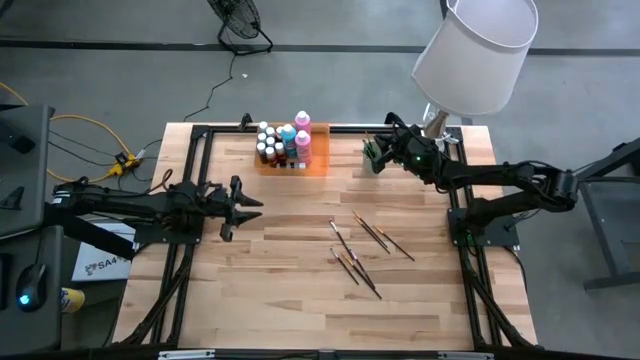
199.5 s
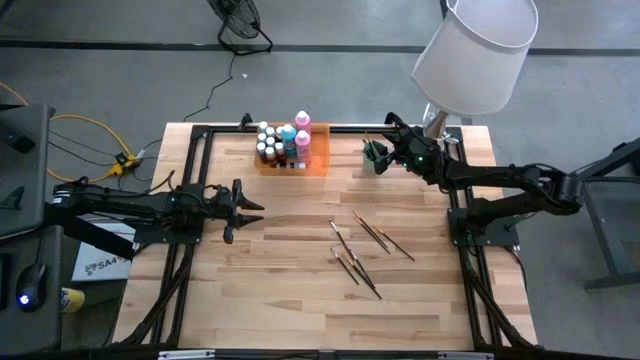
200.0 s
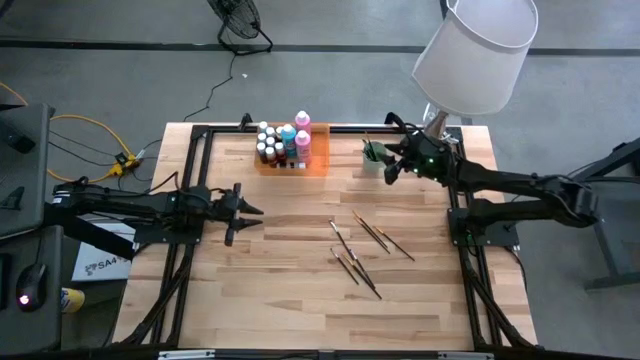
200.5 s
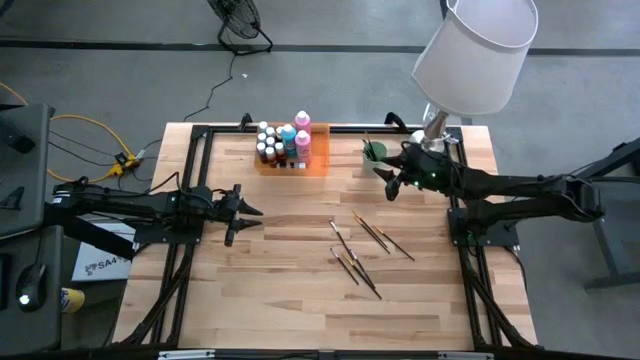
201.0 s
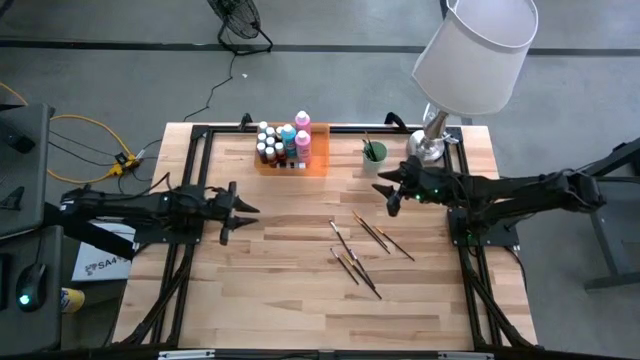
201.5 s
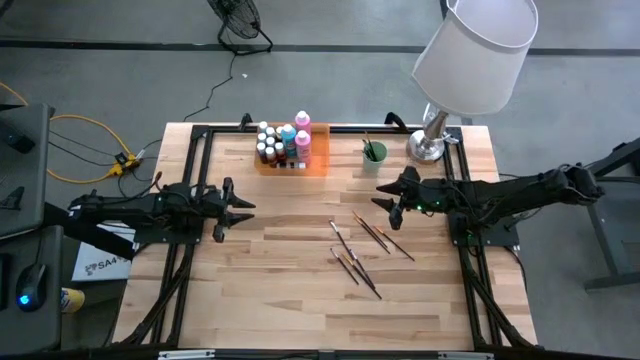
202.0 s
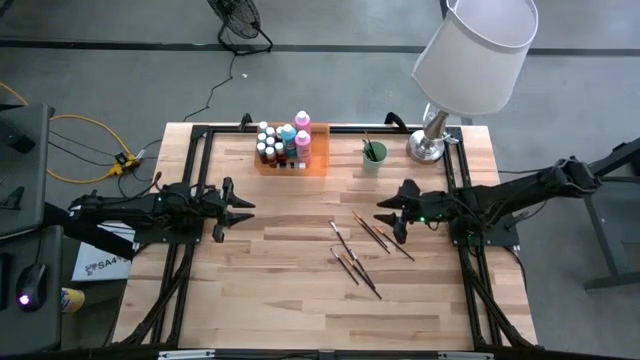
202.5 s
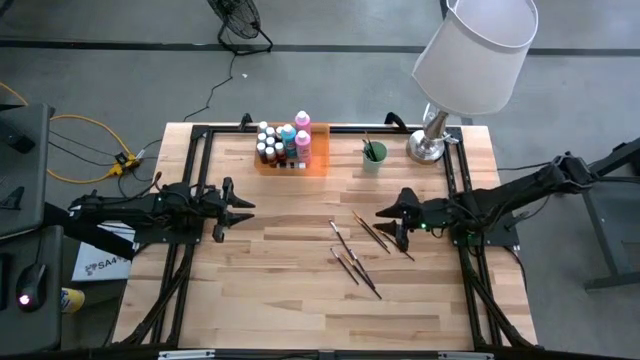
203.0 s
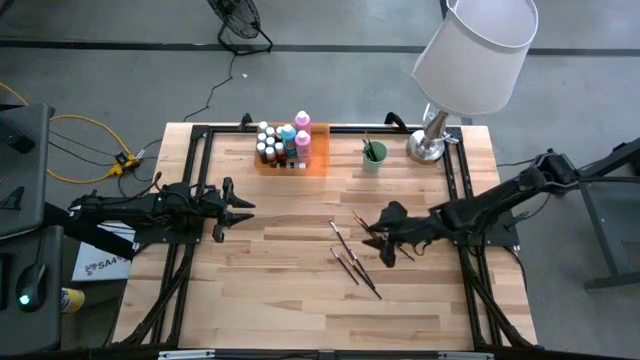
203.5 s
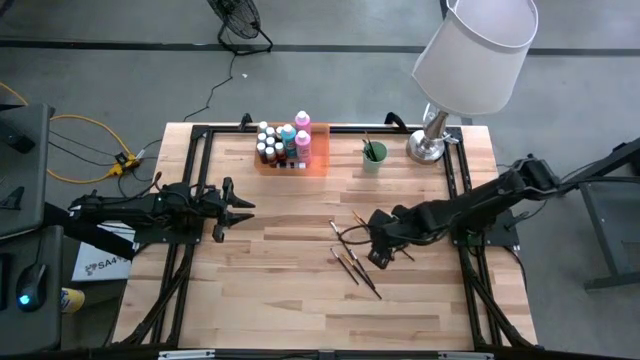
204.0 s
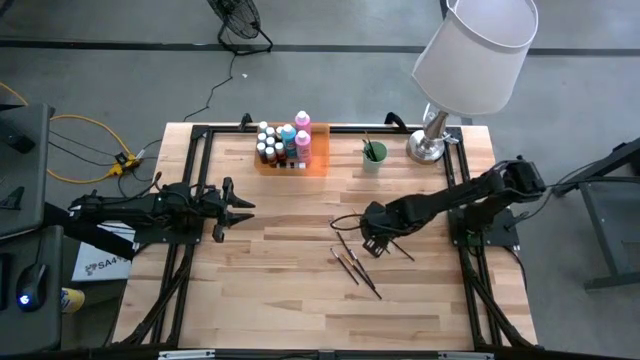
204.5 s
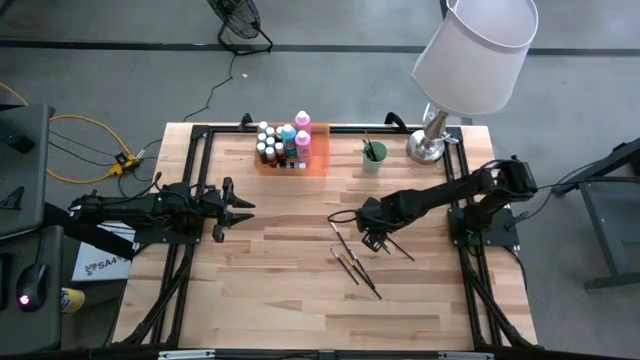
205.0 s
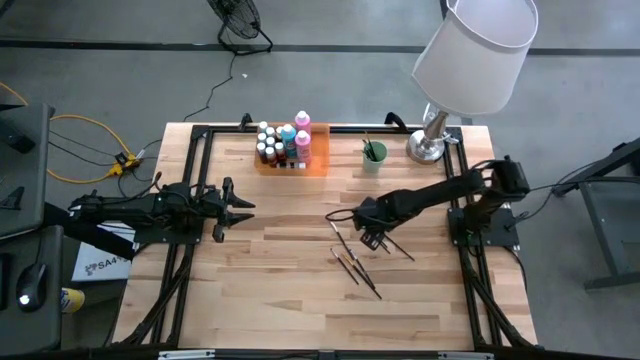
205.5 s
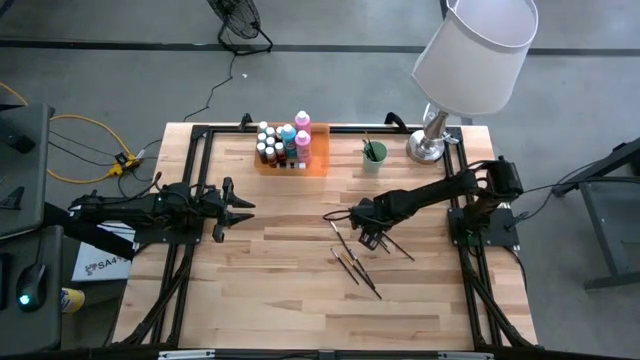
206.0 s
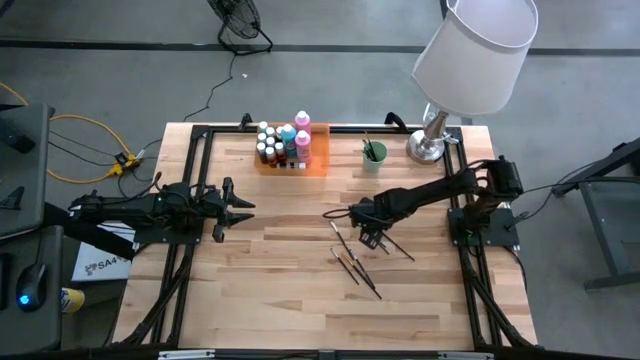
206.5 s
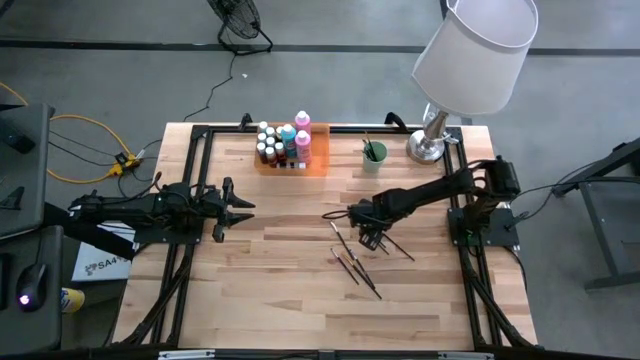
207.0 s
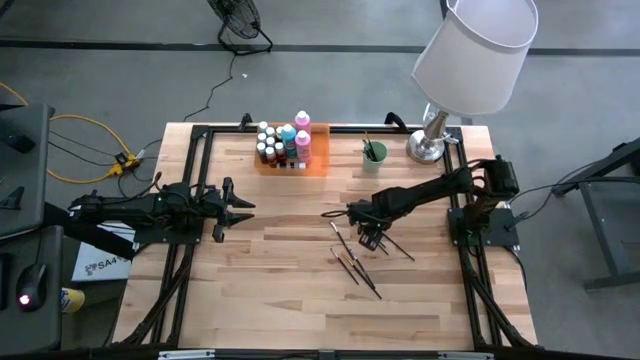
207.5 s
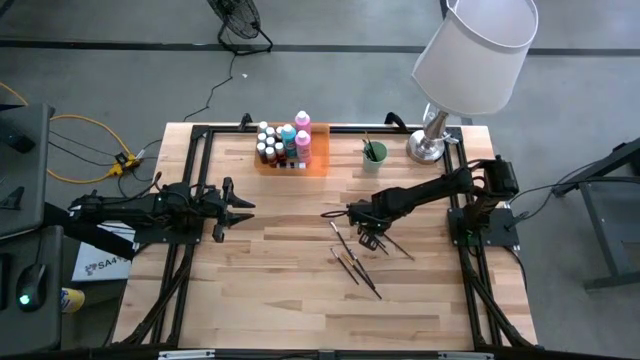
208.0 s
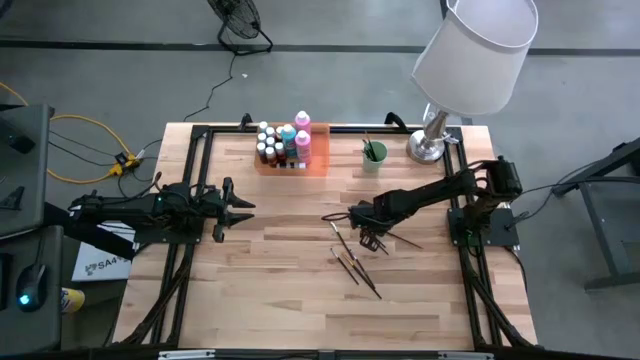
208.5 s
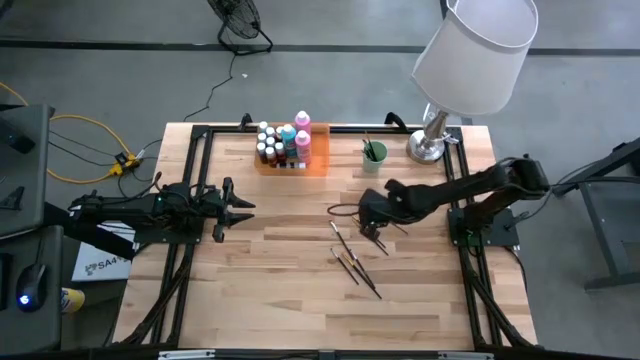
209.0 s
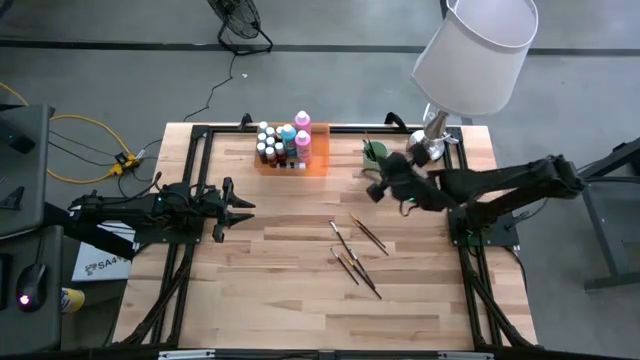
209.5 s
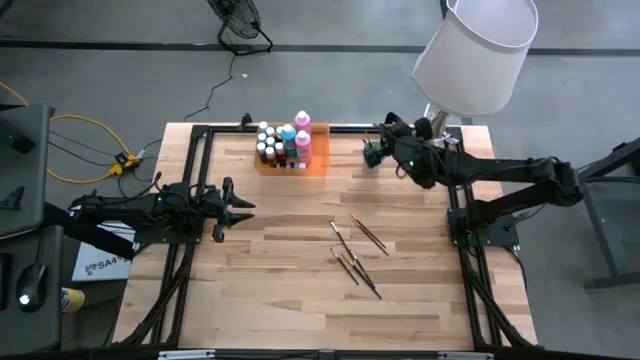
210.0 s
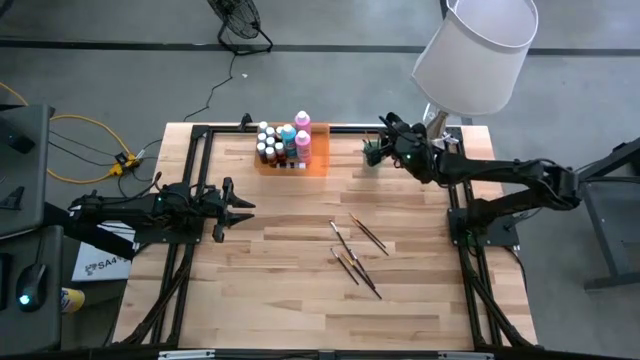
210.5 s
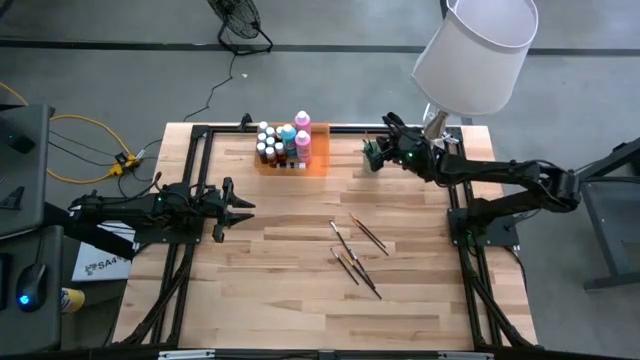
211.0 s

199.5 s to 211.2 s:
Task: Pick & Place Paint Supplies
Put the gold paint brush into the green cup

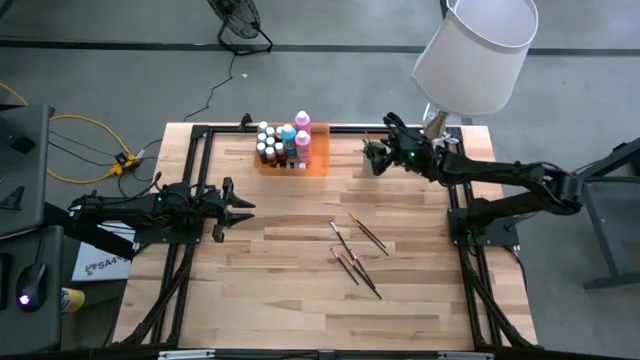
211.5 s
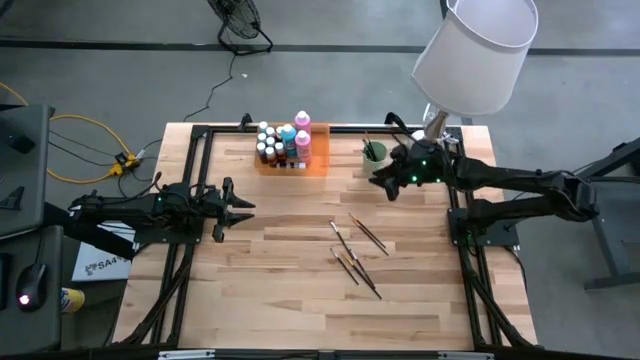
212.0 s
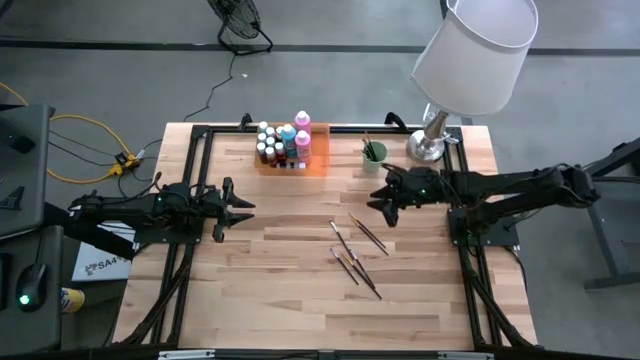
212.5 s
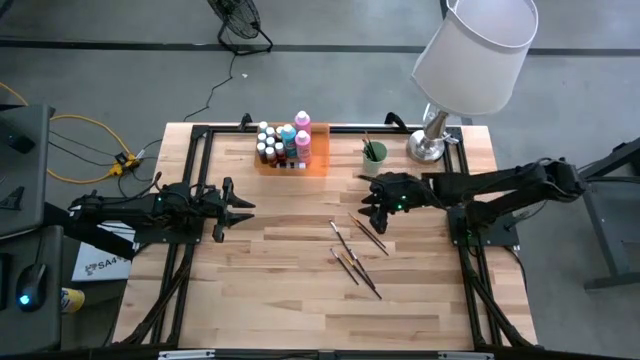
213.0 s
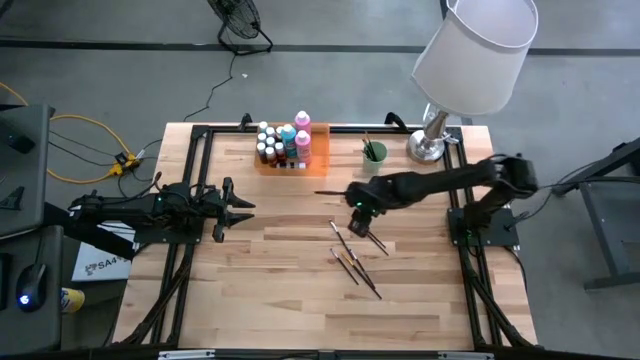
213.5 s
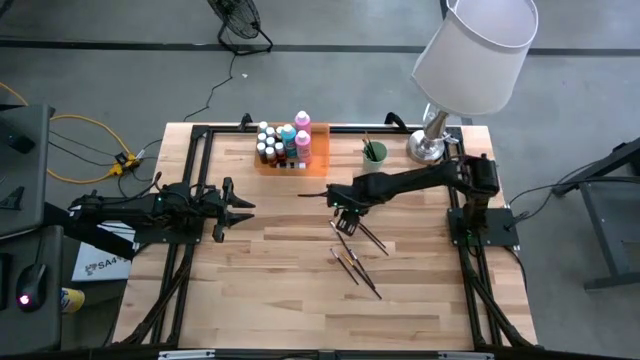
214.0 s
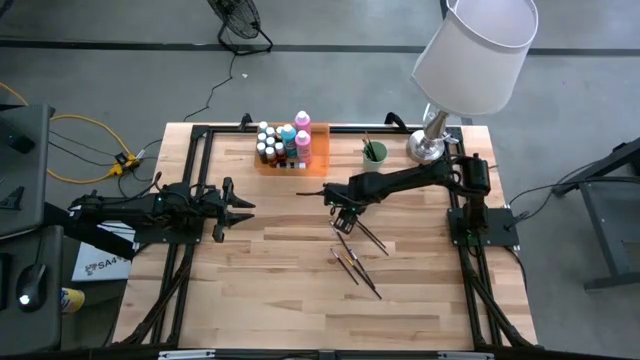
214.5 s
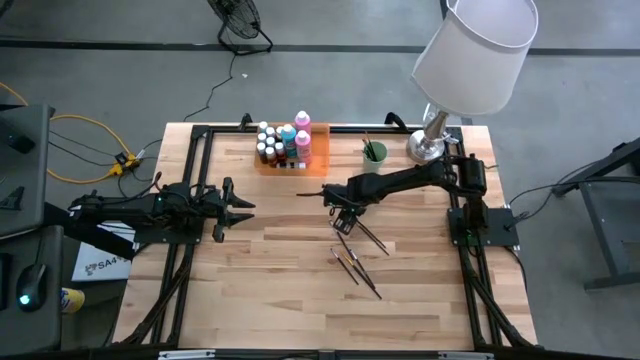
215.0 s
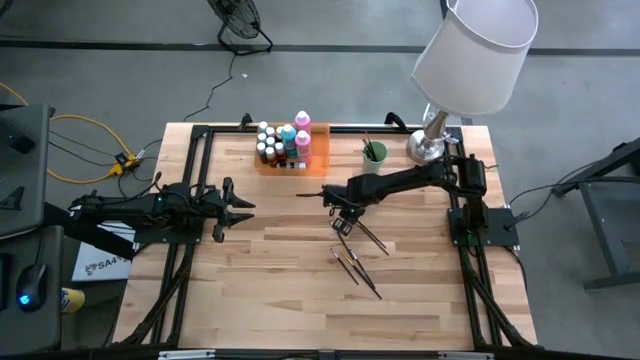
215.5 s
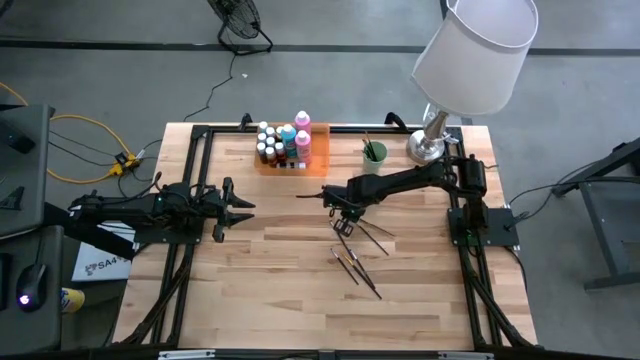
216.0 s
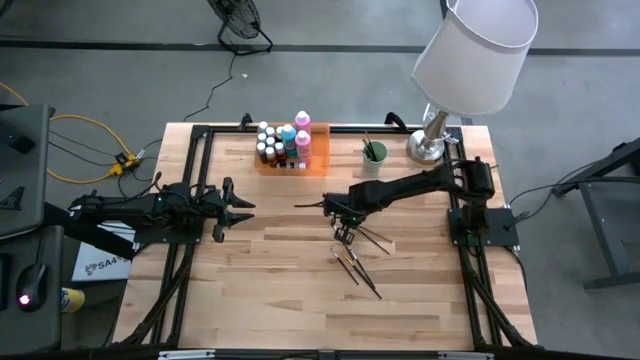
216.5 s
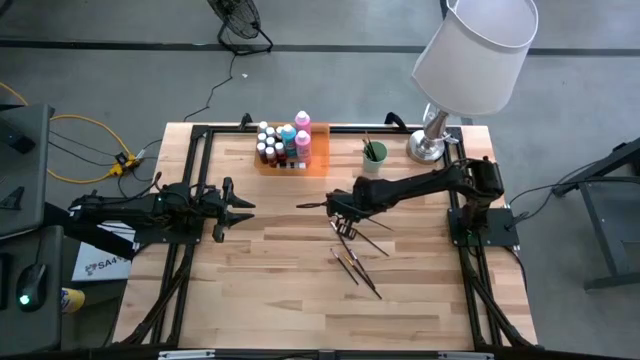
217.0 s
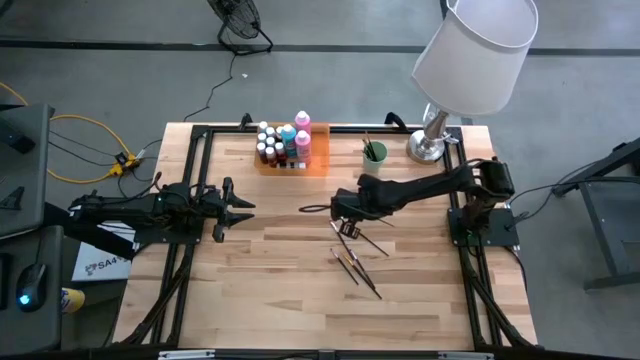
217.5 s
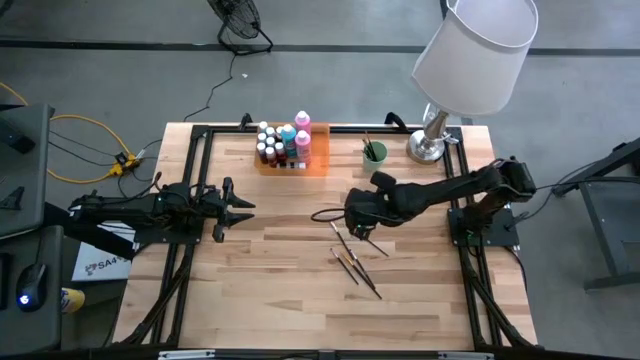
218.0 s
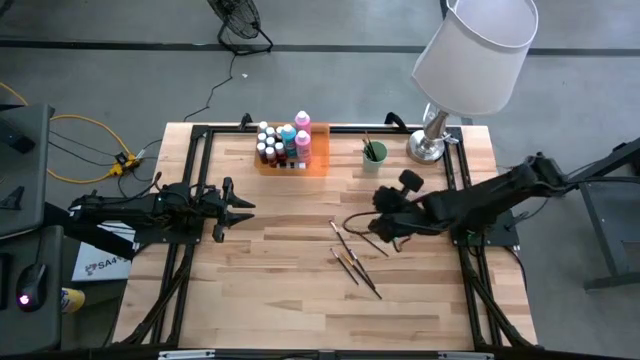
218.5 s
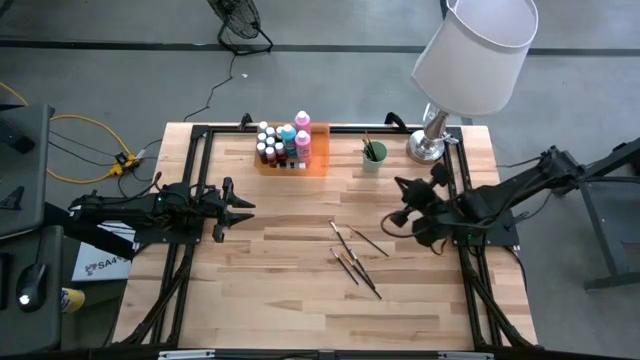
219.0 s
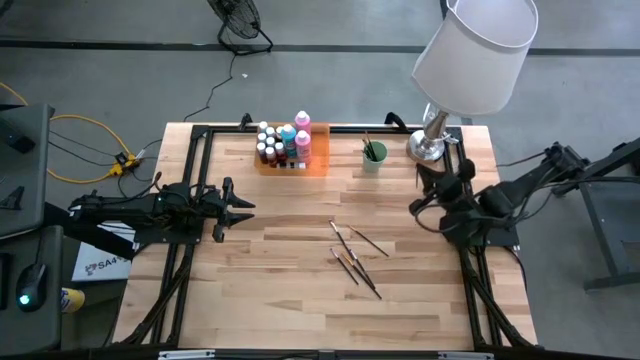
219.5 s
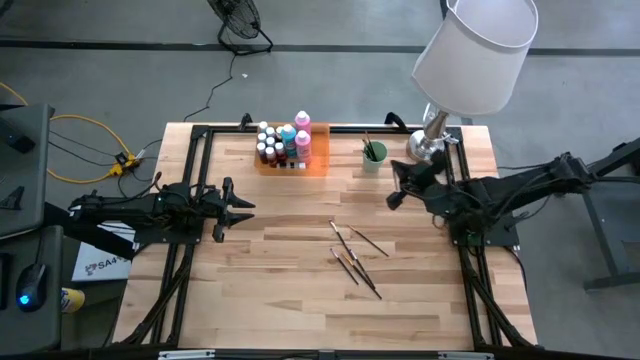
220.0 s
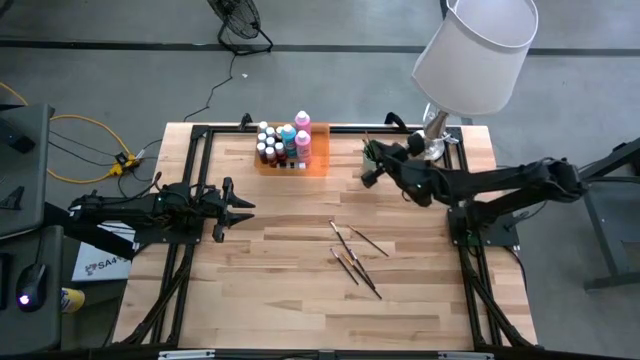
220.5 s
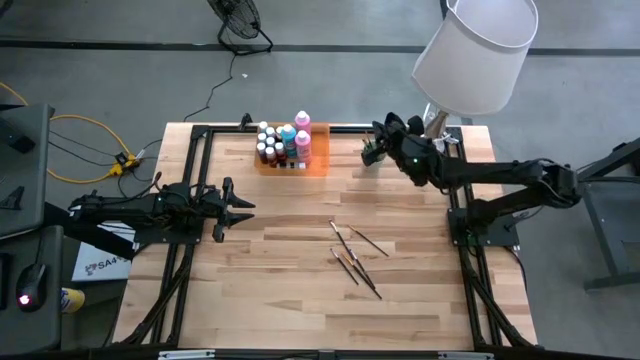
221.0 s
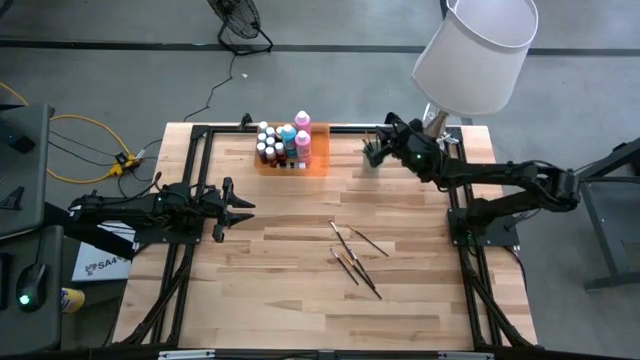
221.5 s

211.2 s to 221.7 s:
Put the gold paint brush into the green cup
